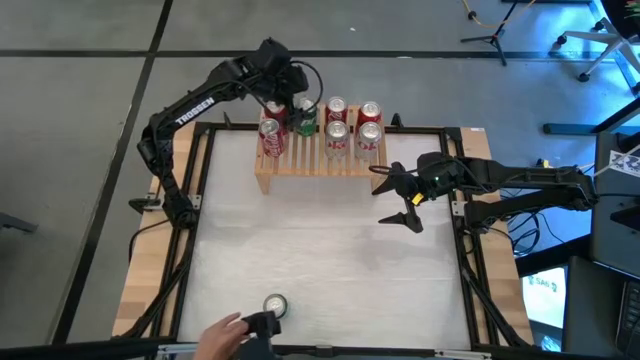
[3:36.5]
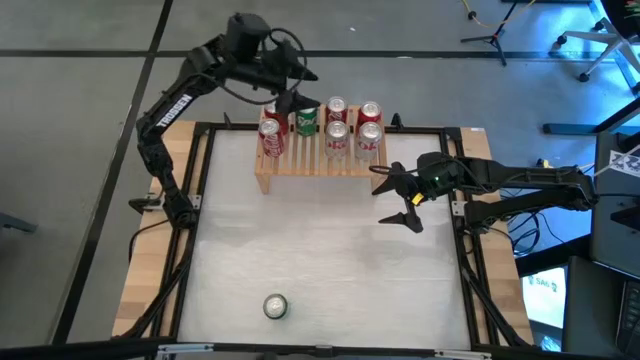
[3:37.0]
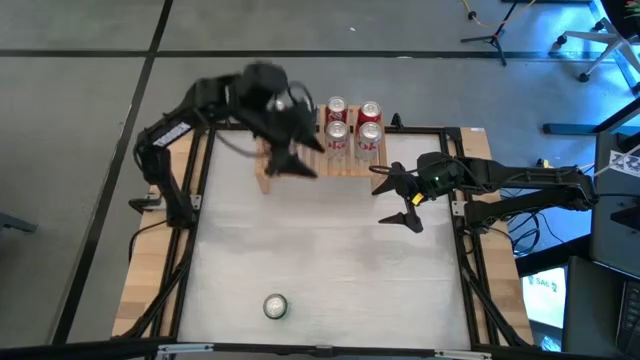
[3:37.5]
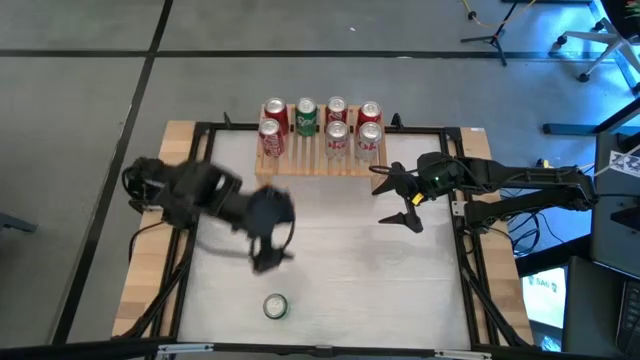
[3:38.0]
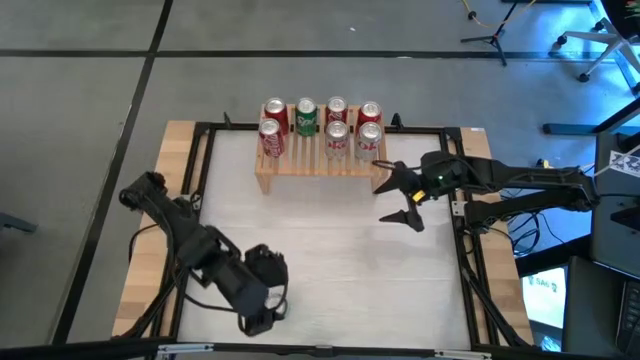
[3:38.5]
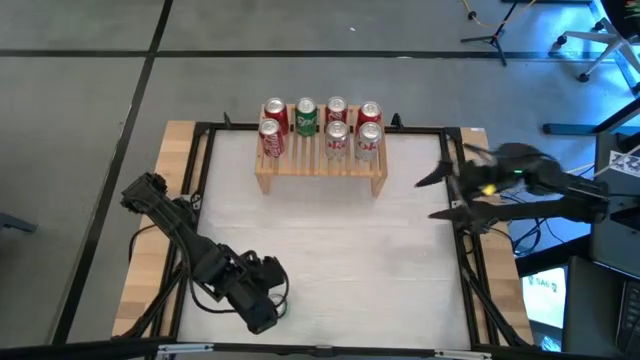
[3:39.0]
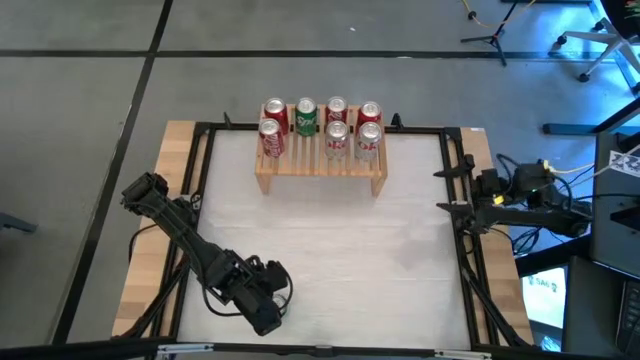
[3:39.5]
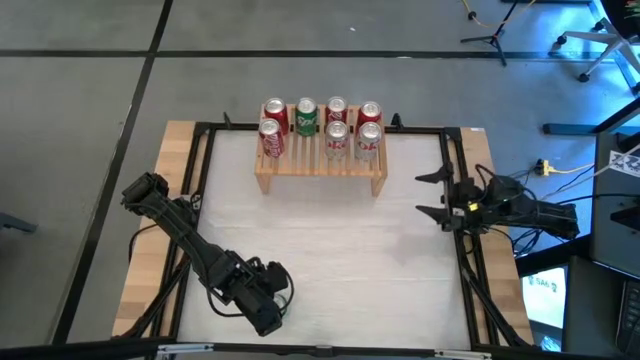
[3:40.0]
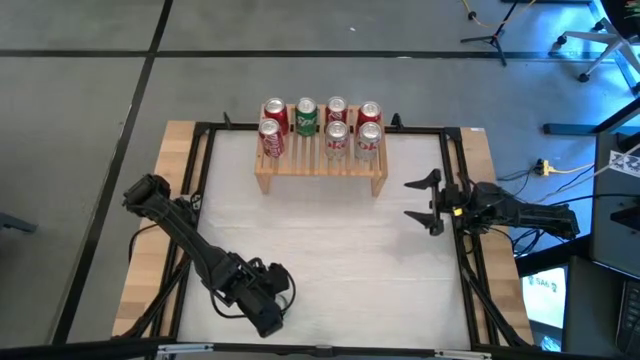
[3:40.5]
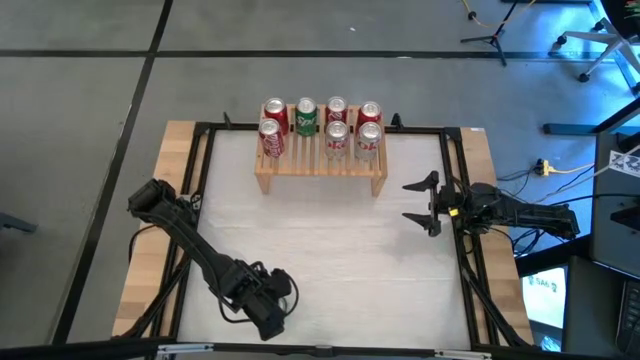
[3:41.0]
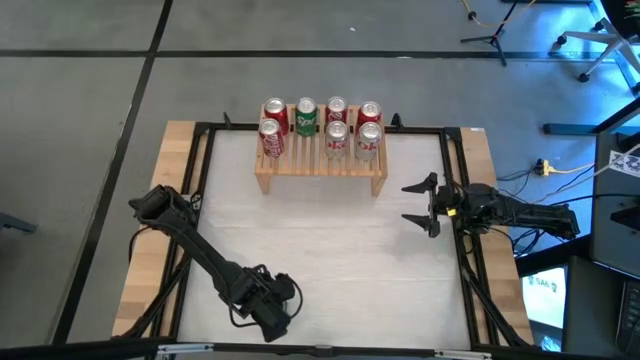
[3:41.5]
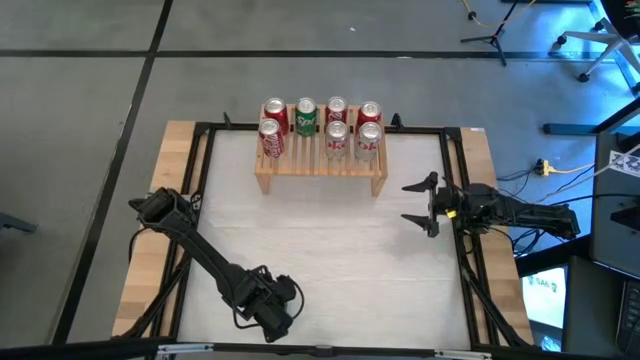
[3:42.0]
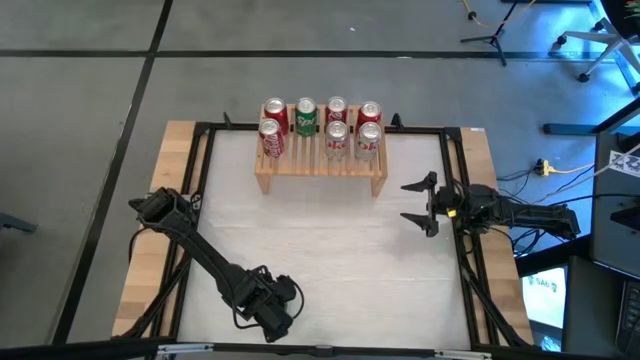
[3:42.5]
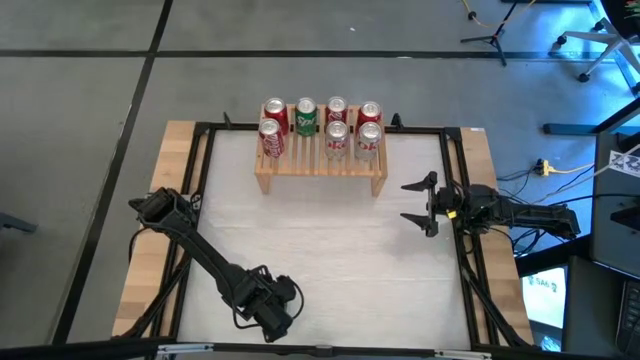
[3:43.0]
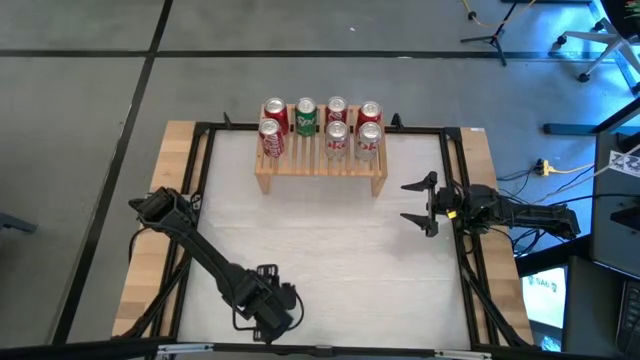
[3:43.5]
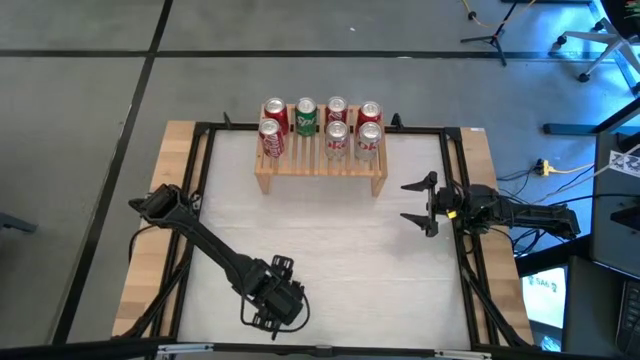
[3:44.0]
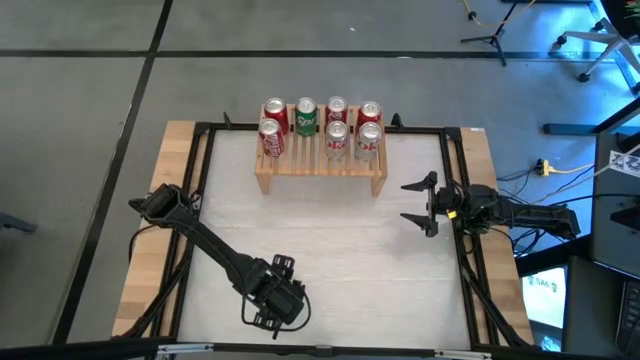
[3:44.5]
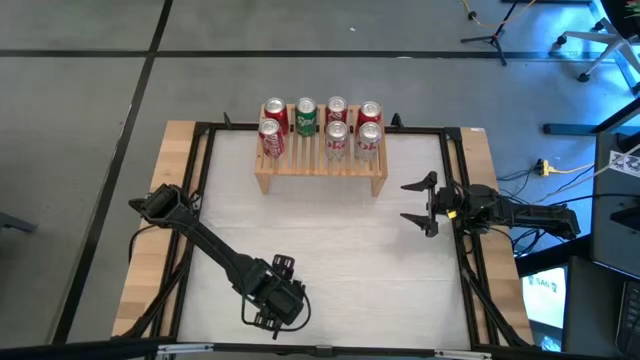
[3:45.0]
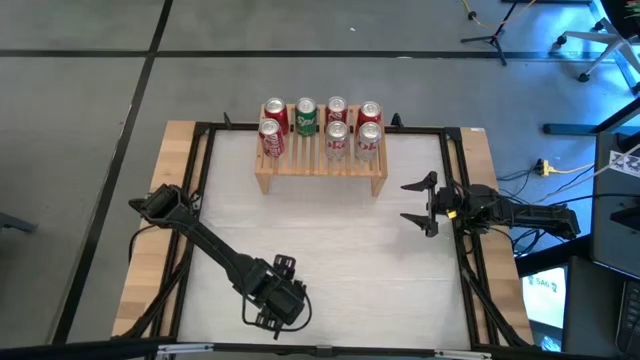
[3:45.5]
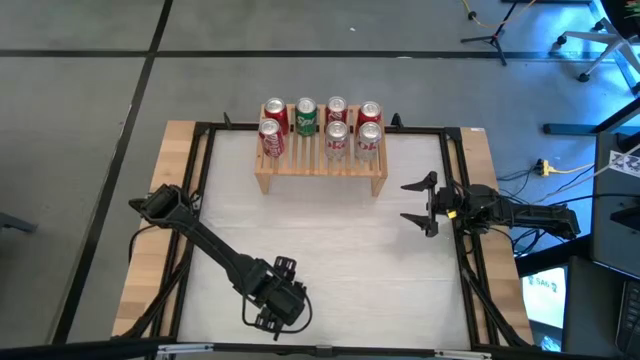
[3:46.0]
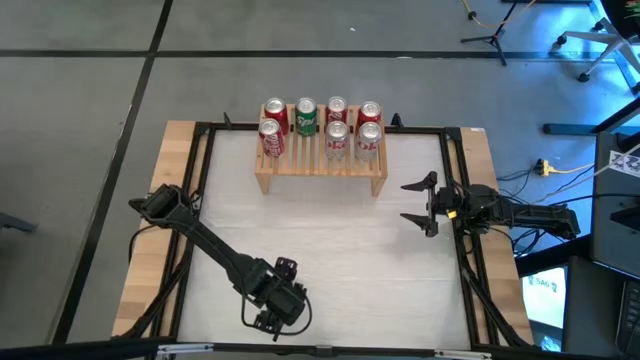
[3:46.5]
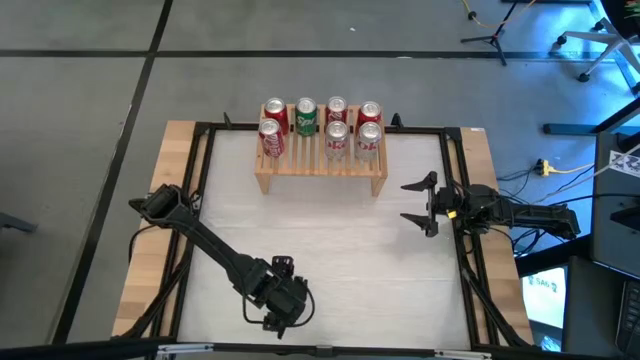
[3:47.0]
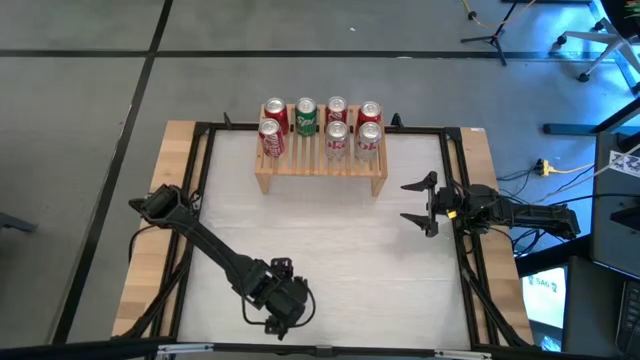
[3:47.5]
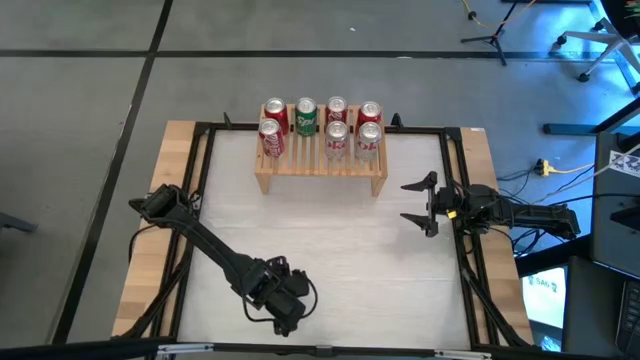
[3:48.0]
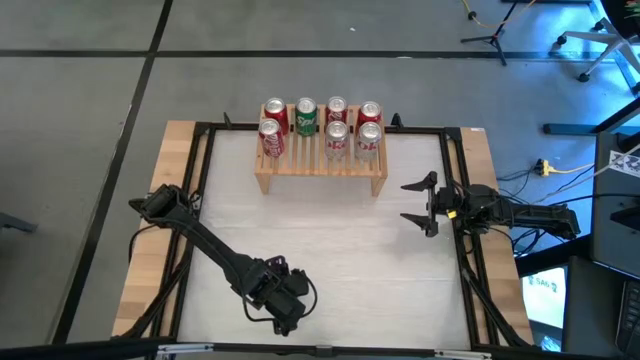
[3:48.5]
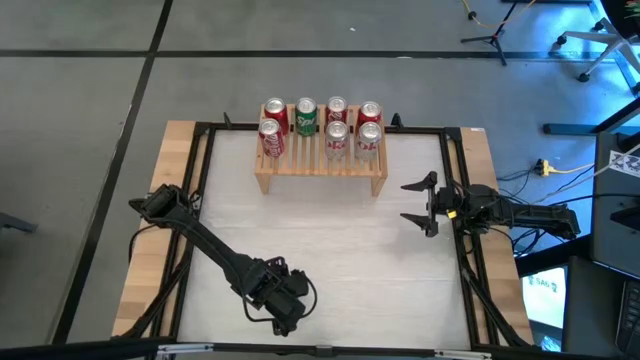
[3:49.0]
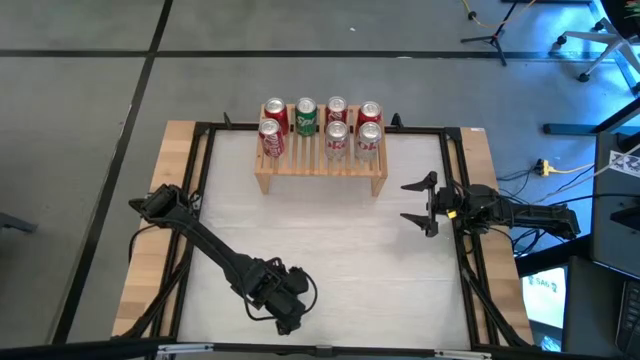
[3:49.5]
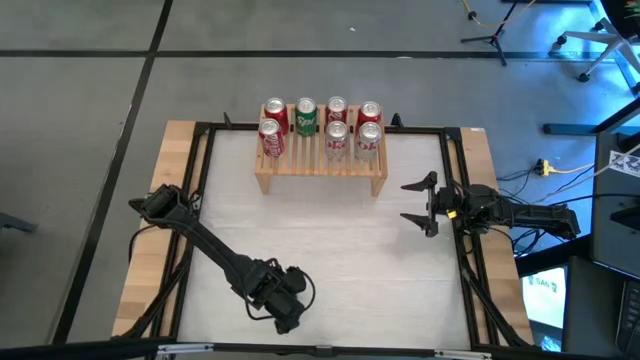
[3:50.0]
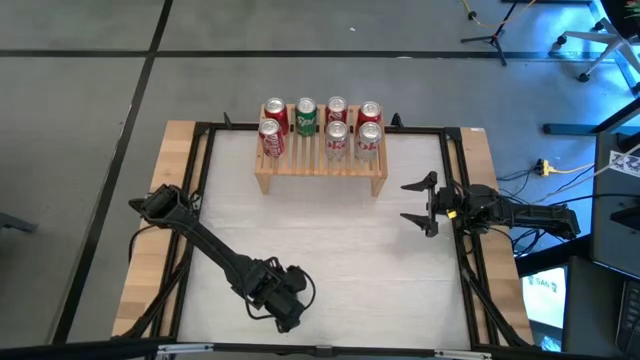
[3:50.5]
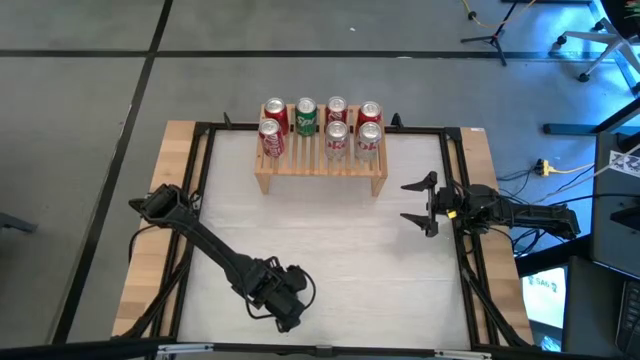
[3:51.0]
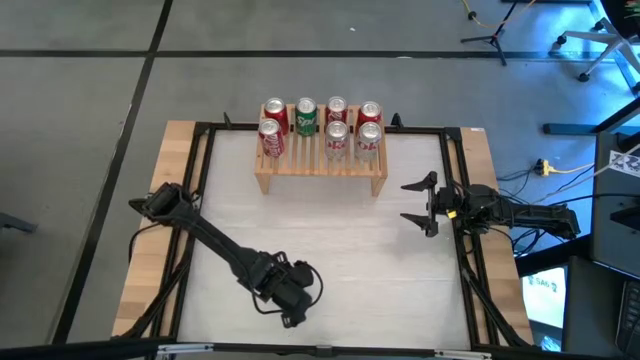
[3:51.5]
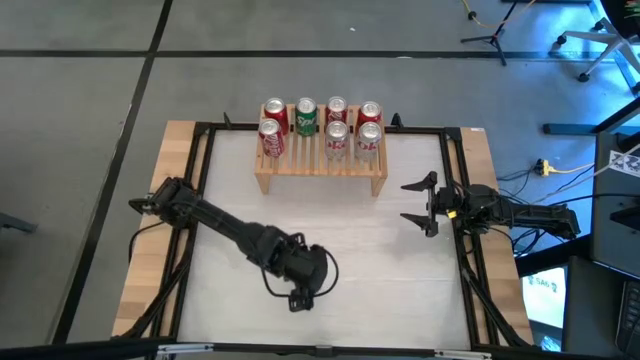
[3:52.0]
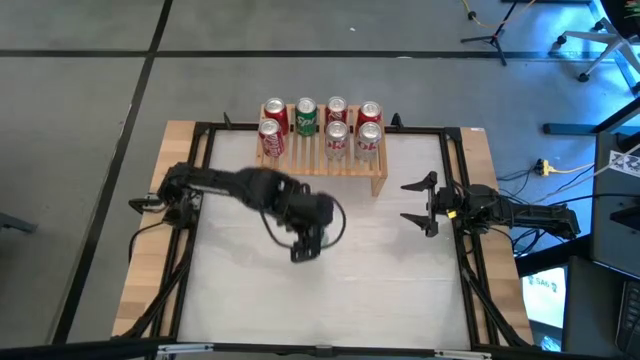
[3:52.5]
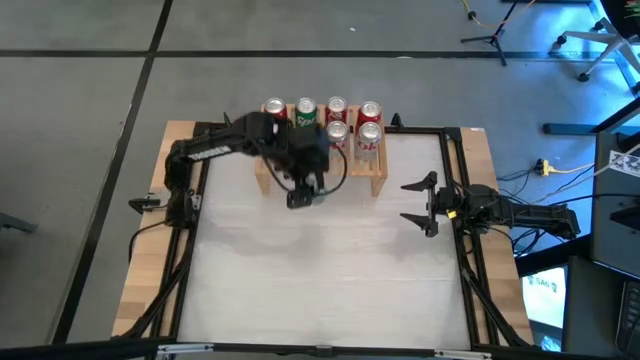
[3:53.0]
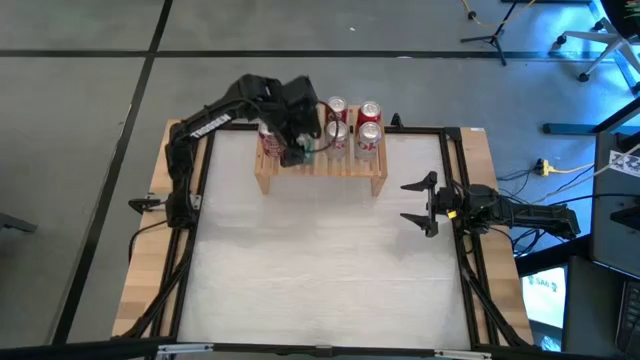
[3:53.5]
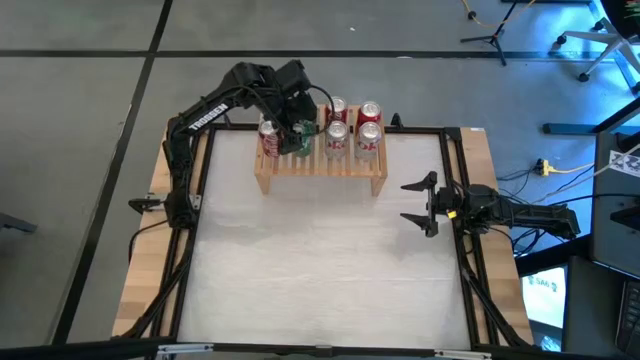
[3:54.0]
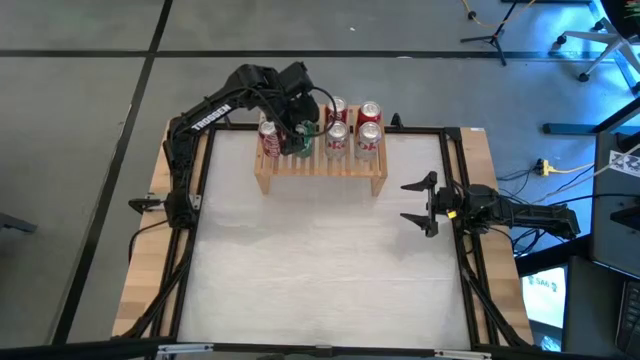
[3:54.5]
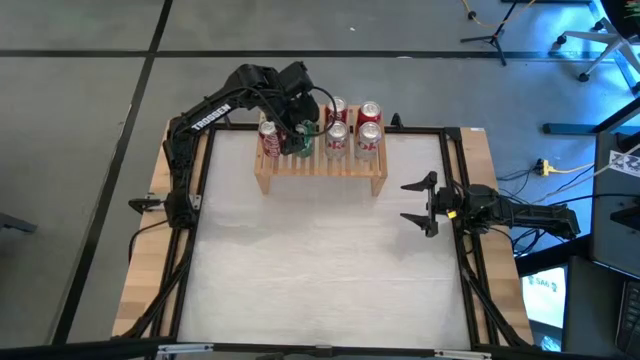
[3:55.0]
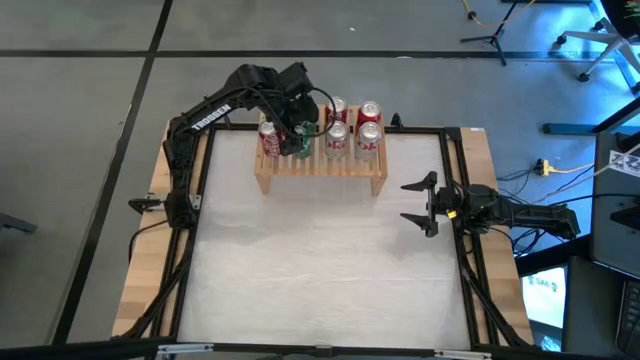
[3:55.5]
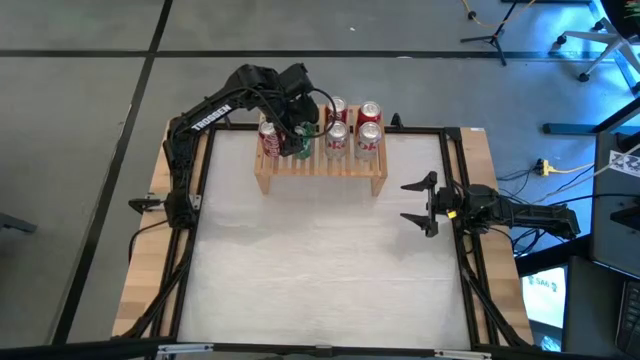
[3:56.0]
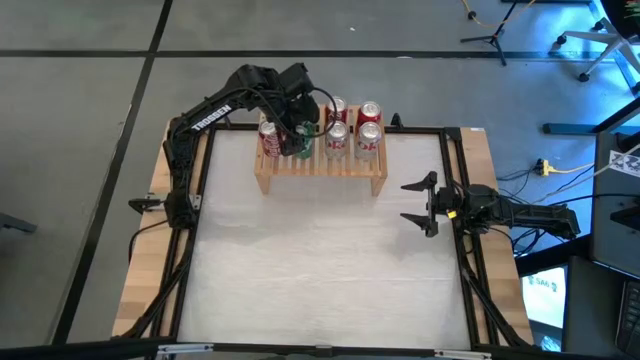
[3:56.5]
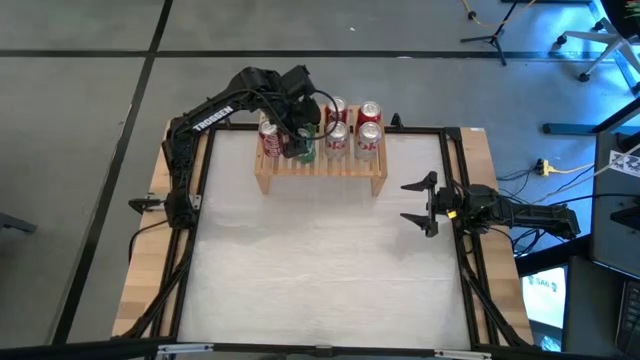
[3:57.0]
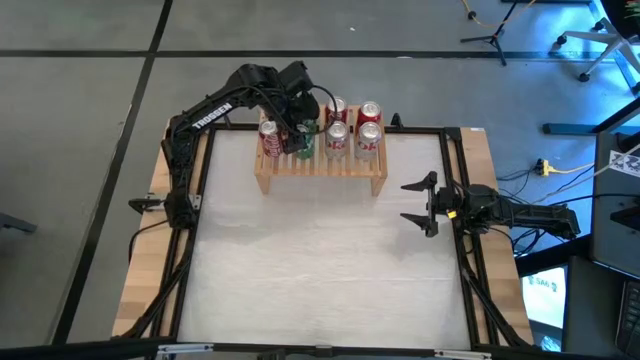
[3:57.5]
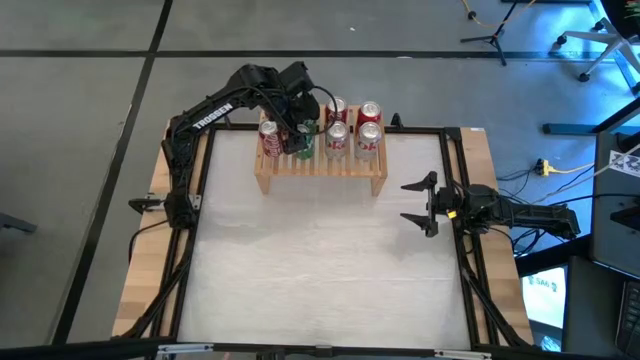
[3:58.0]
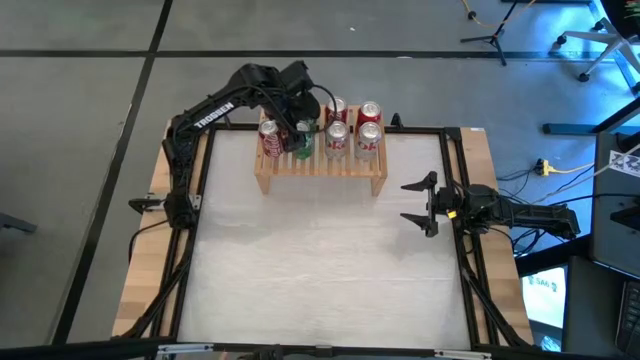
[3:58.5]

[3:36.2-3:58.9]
Task: Place canned beverage on shelf
Put the green soda can in line with the other green soda can on the shelf
